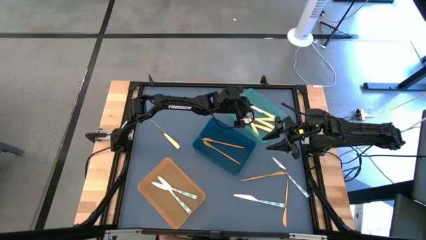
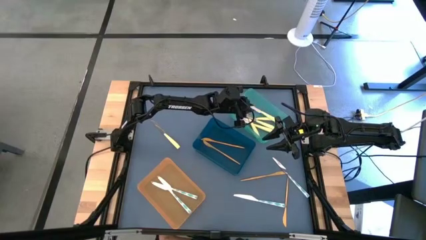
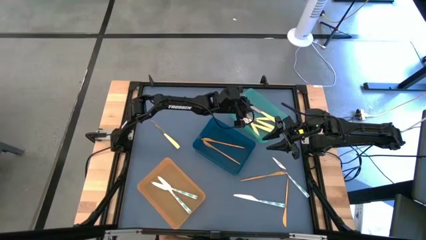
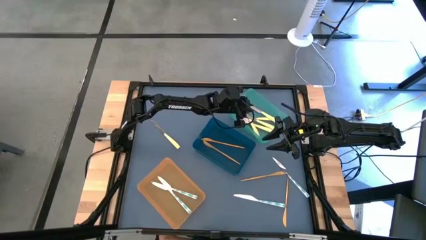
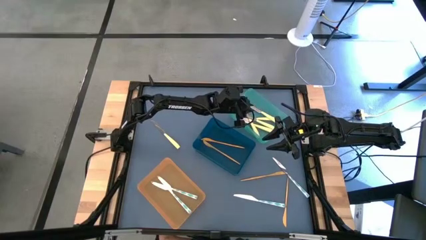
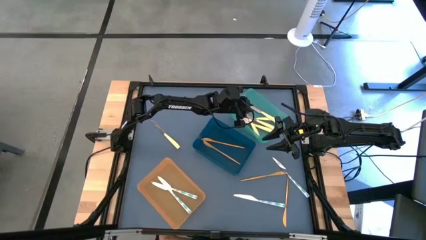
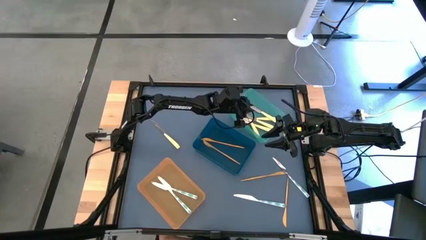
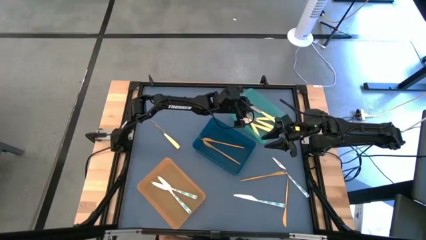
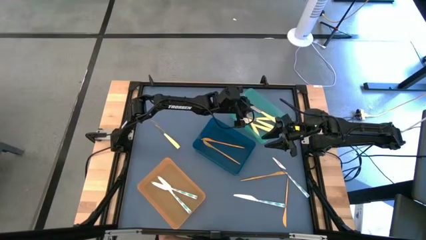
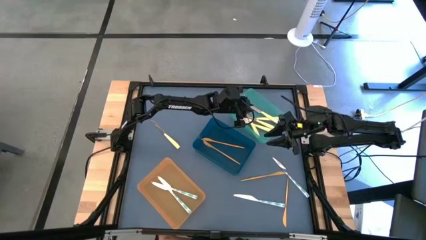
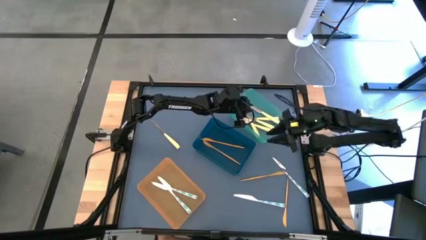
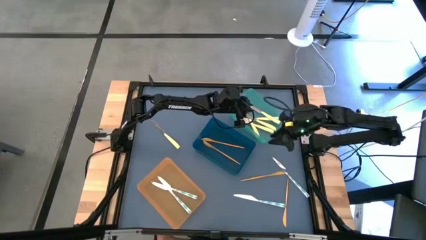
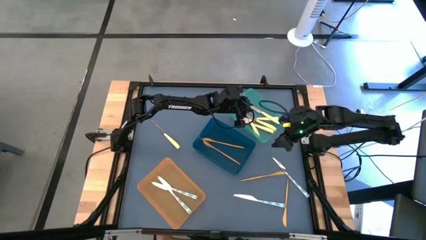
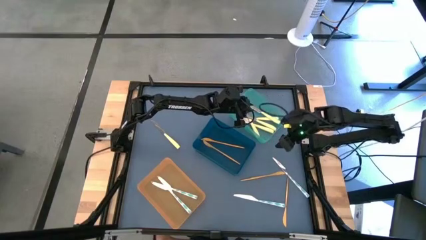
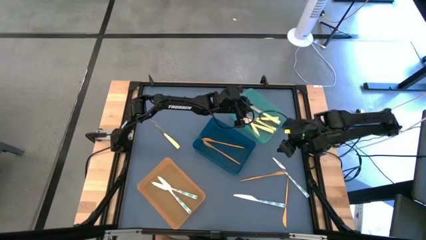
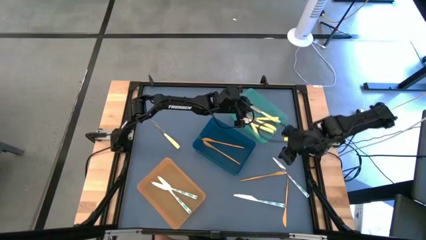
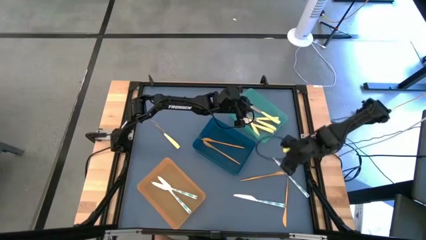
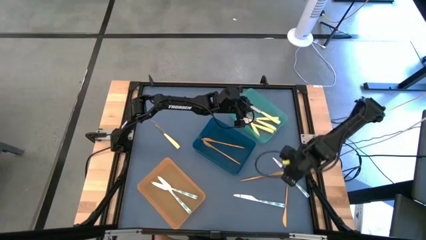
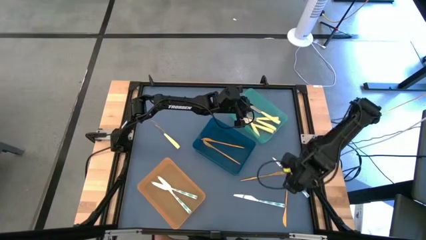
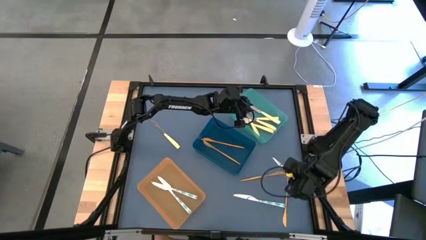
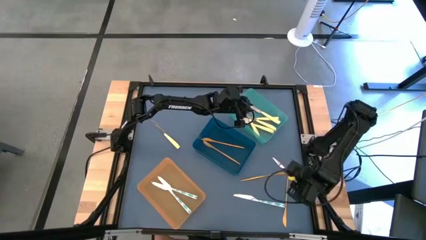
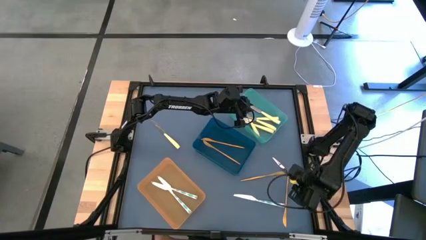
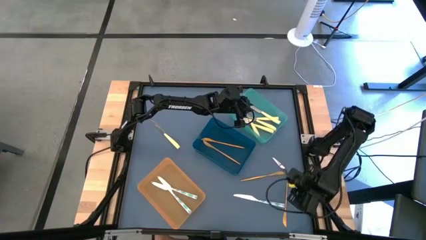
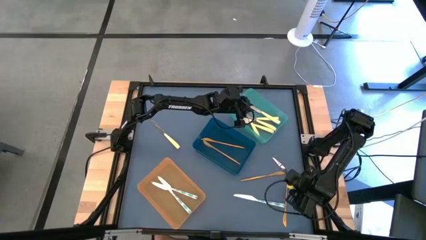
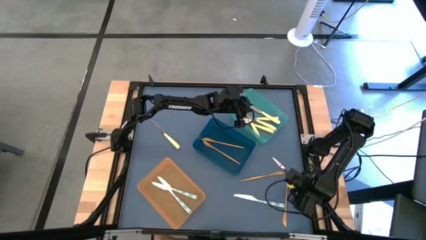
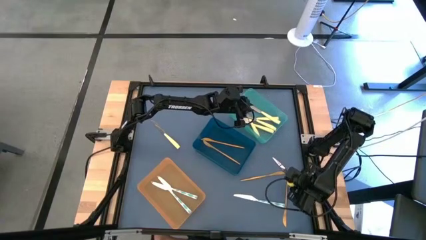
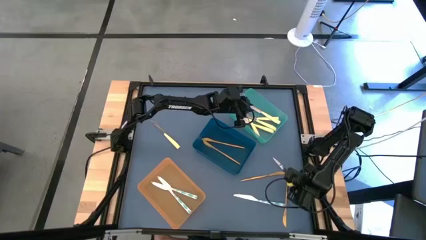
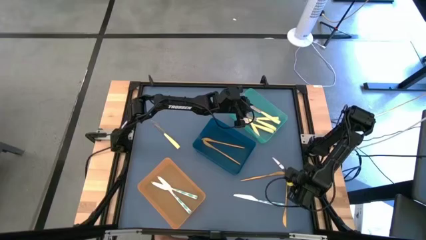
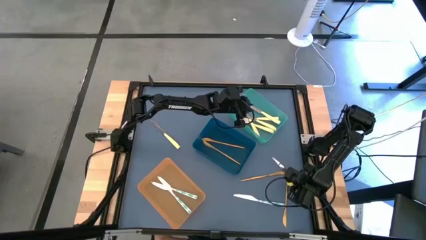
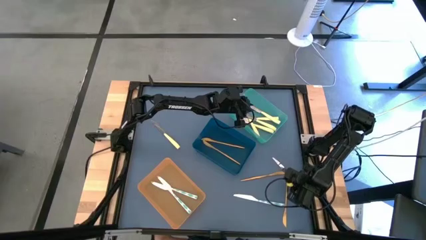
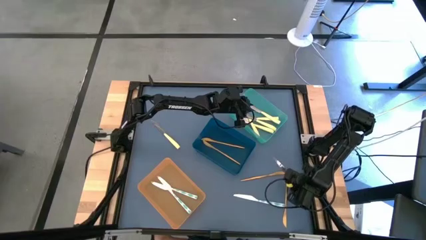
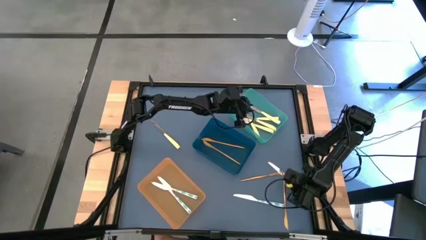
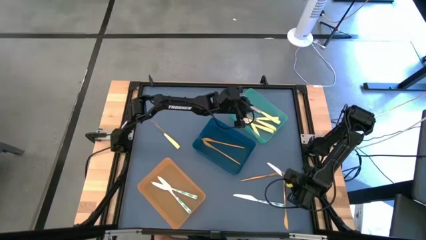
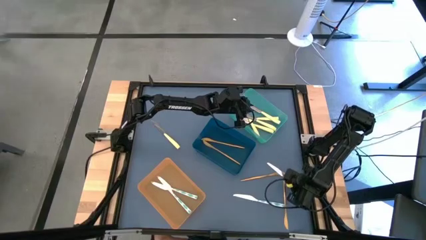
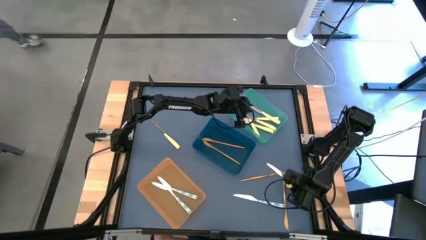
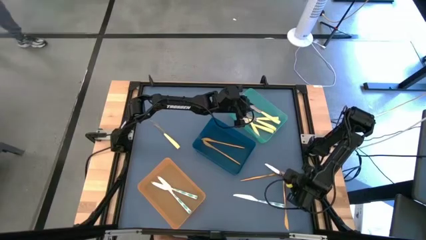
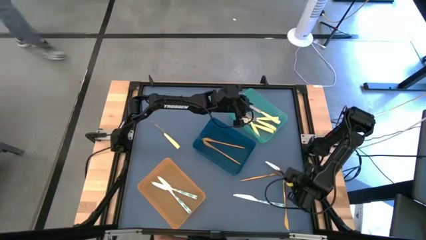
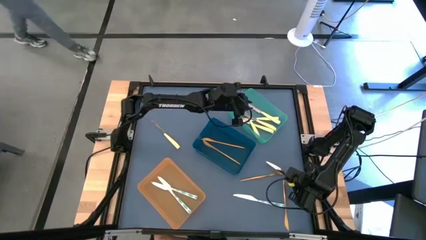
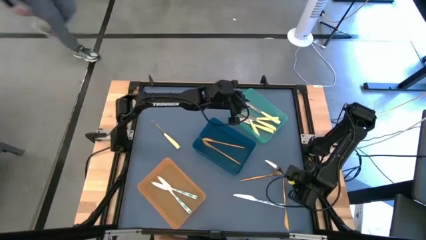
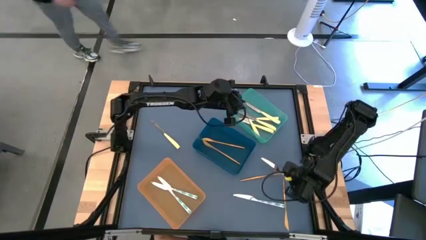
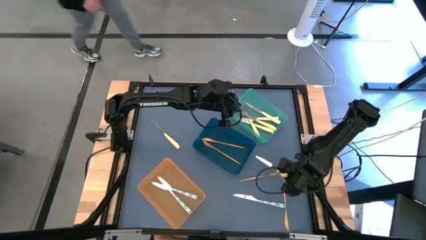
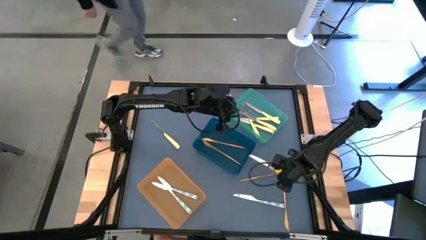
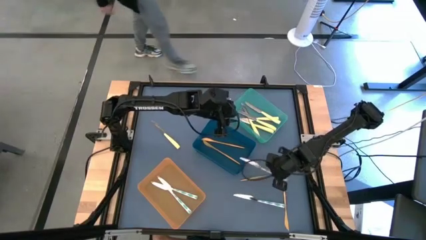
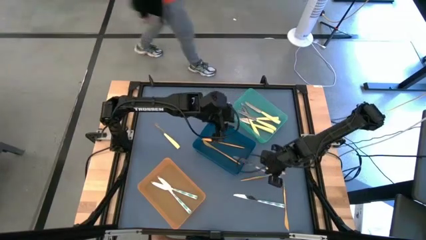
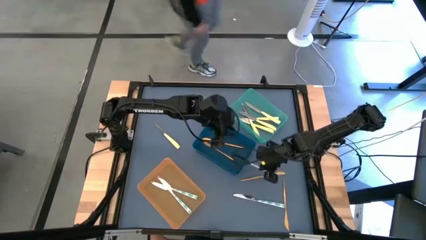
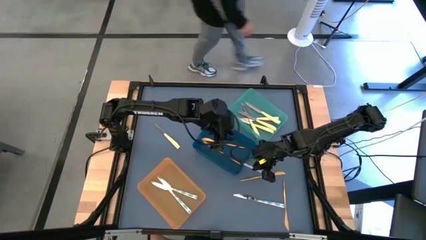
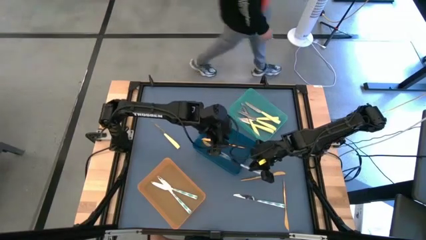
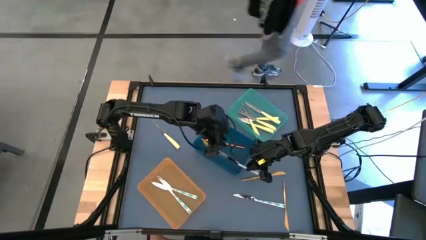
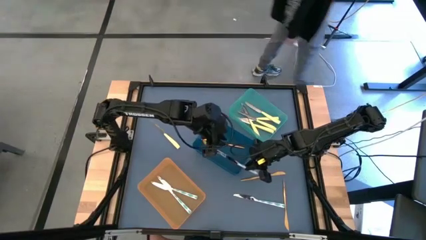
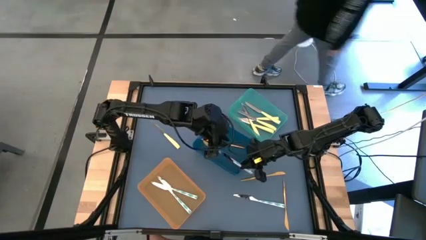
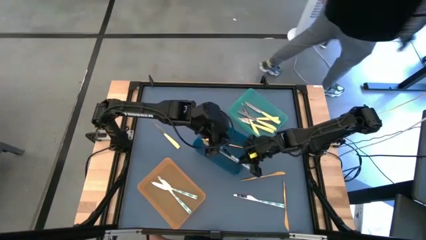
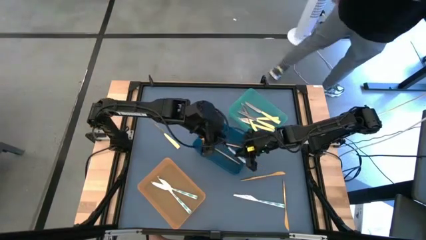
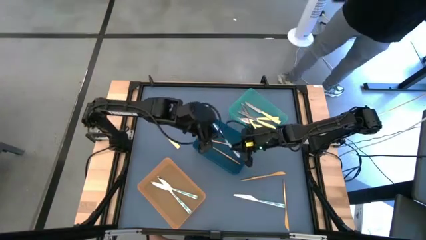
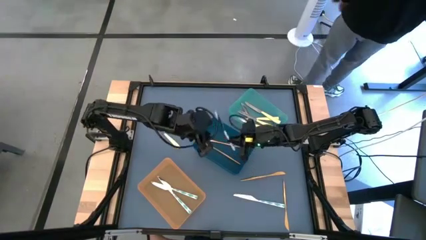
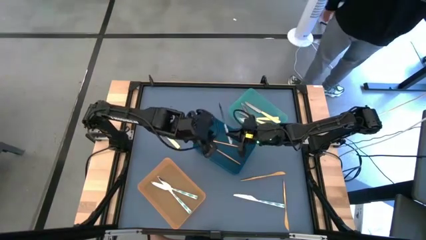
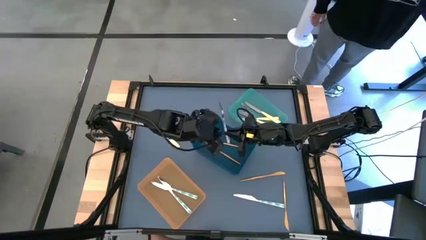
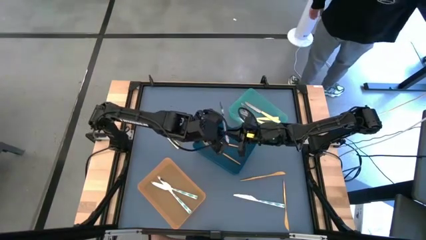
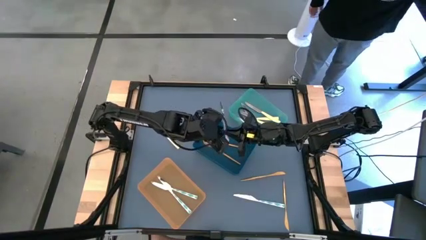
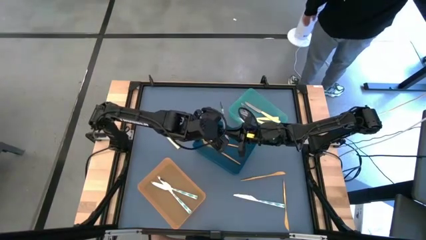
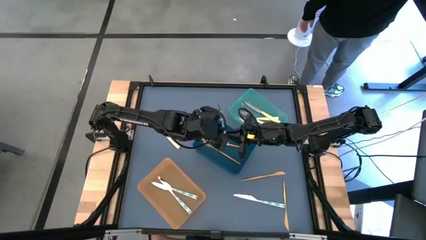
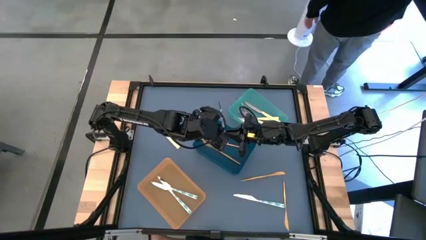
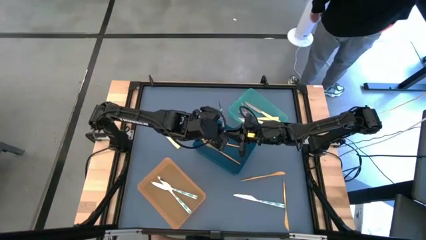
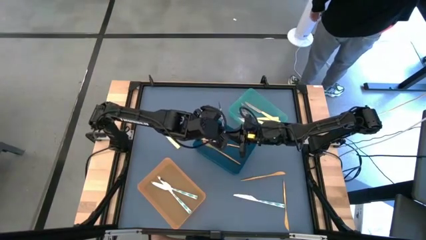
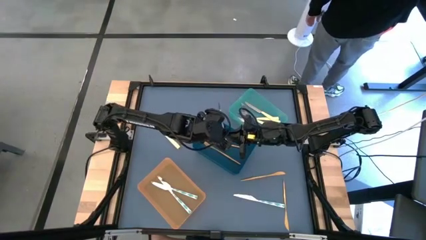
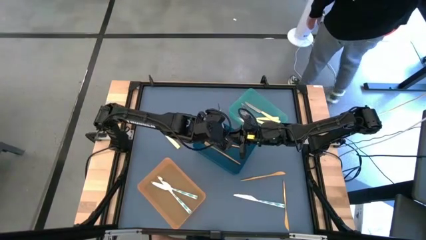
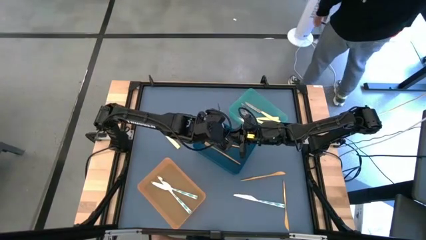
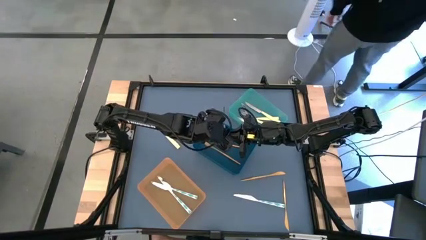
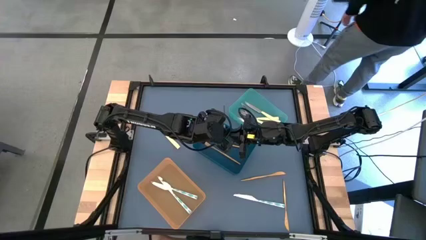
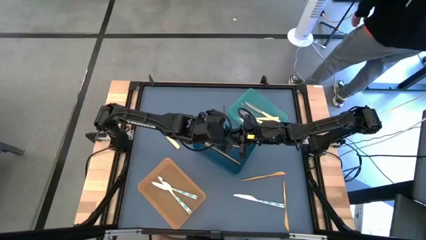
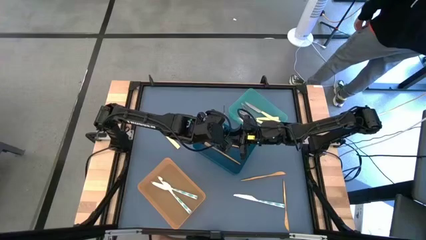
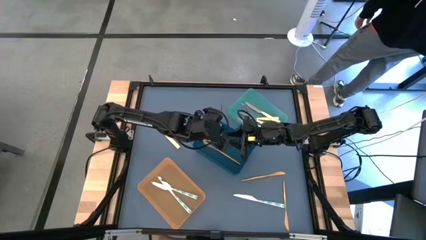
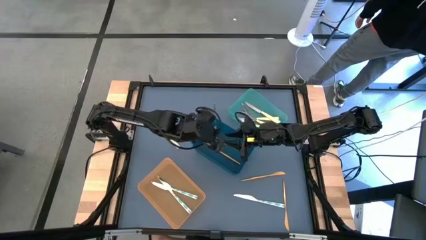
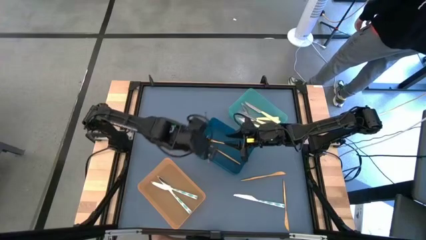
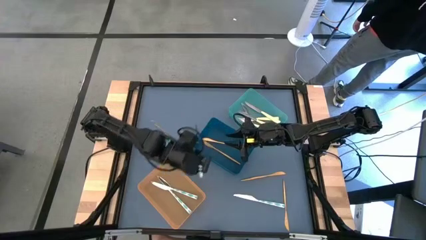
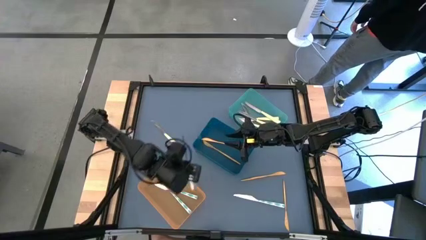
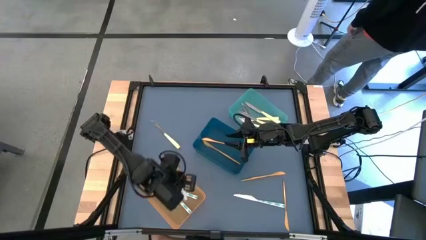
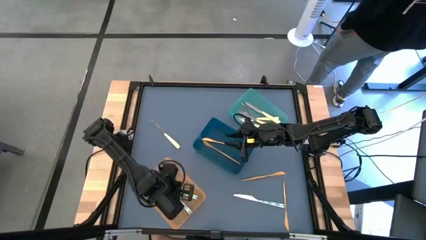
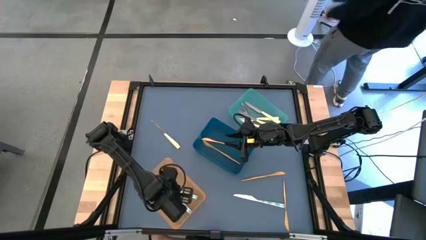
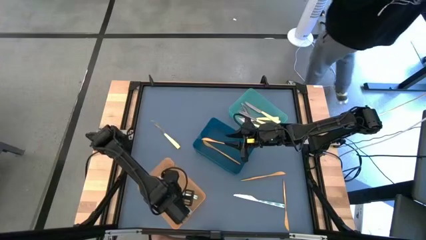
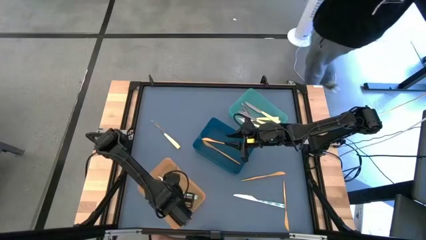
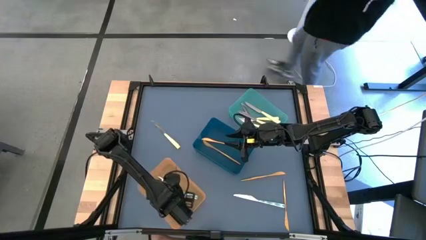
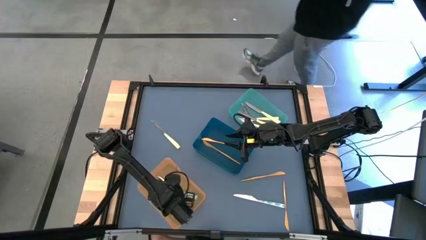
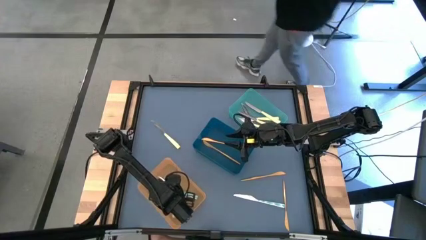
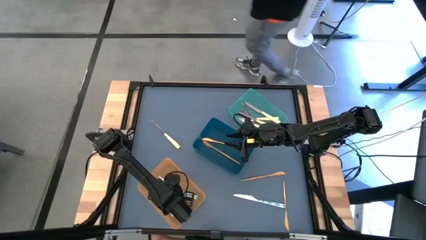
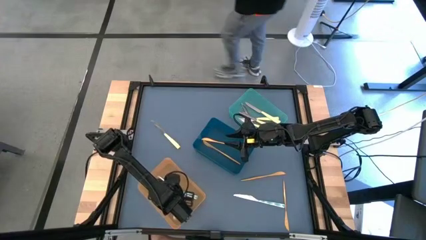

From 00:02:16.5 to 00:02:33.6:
Task: Sort silverware by color (type)
Put the left blue knife into the orange bin
